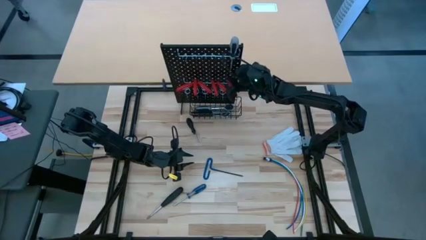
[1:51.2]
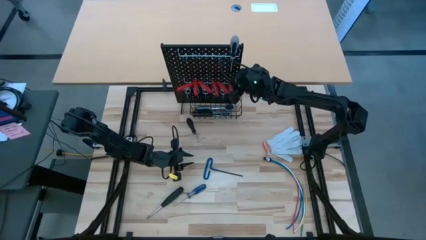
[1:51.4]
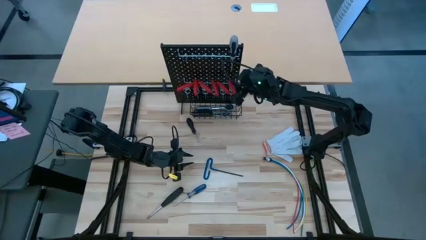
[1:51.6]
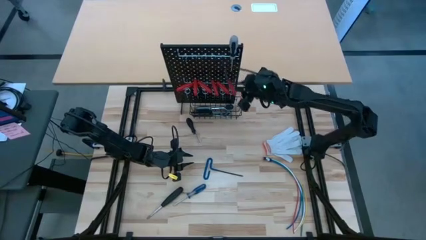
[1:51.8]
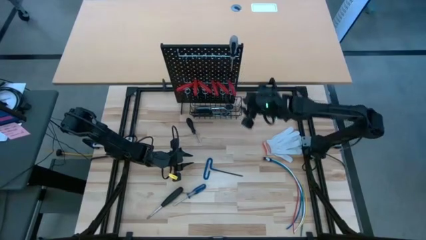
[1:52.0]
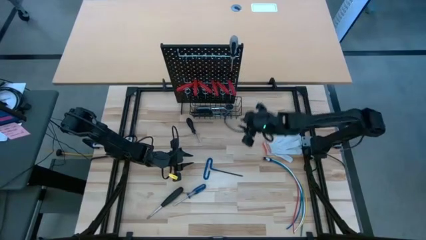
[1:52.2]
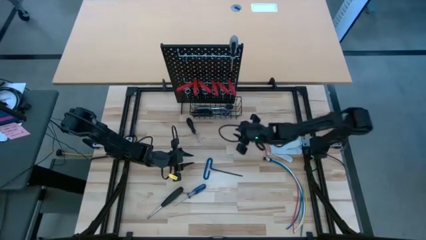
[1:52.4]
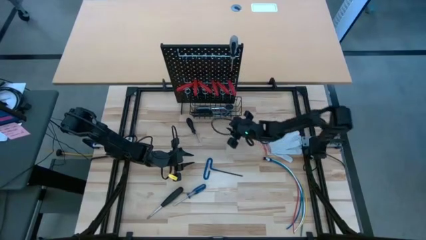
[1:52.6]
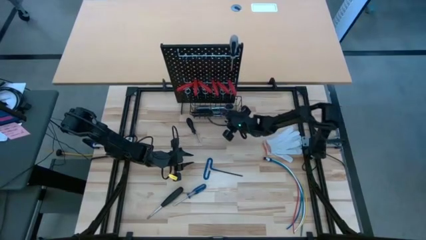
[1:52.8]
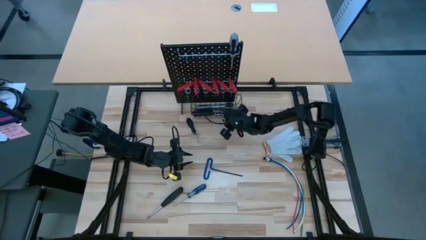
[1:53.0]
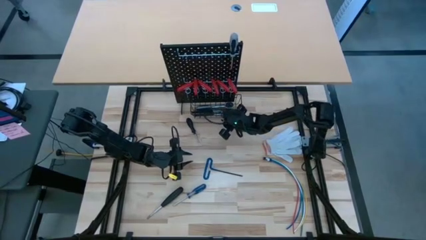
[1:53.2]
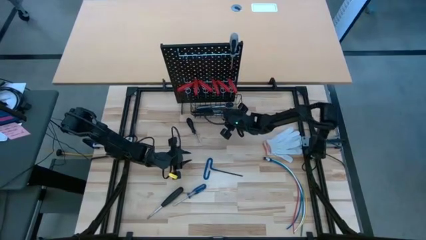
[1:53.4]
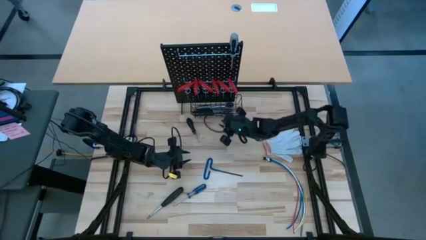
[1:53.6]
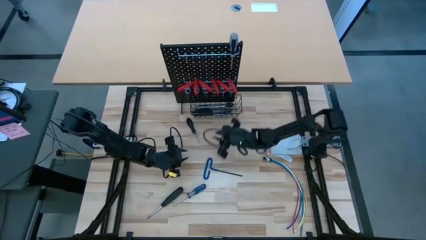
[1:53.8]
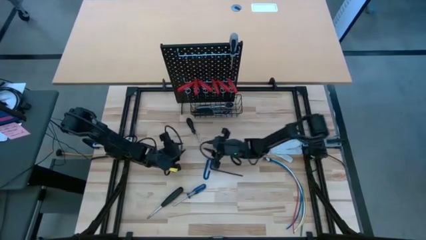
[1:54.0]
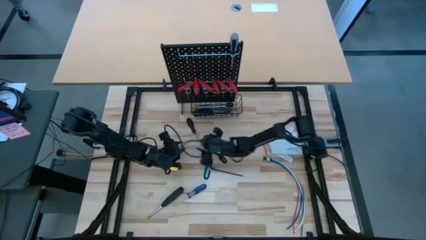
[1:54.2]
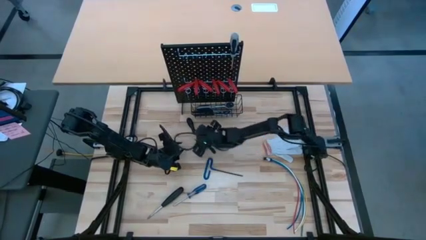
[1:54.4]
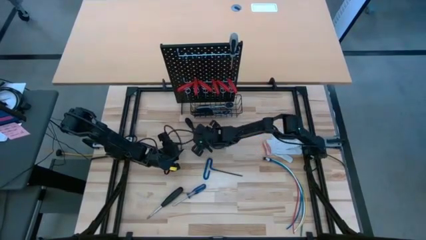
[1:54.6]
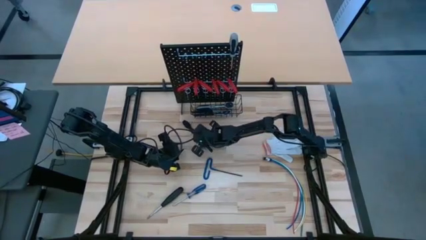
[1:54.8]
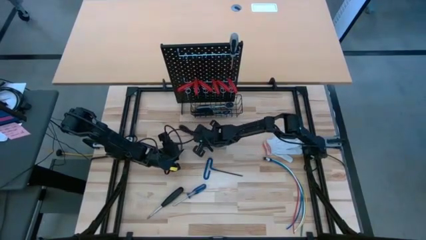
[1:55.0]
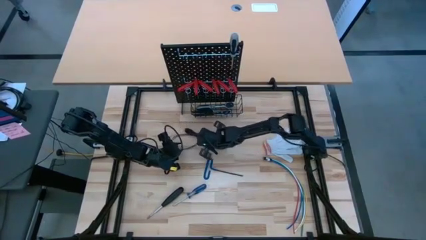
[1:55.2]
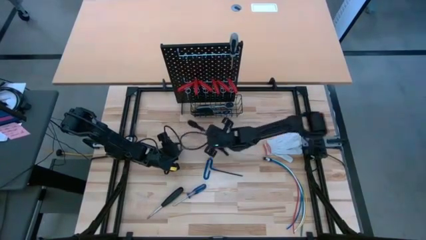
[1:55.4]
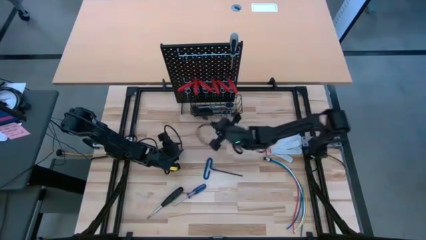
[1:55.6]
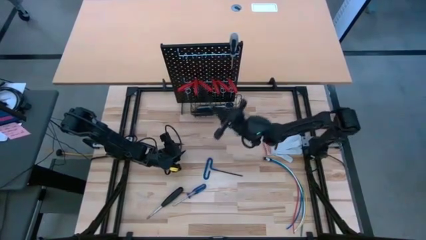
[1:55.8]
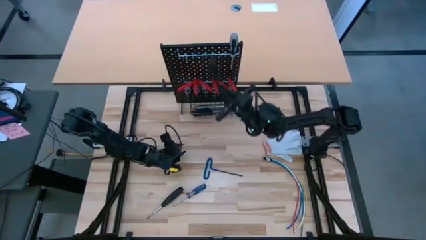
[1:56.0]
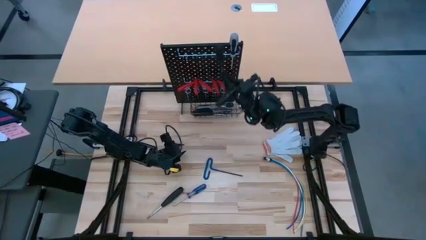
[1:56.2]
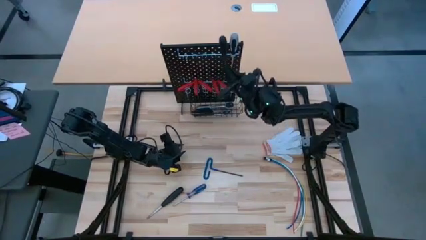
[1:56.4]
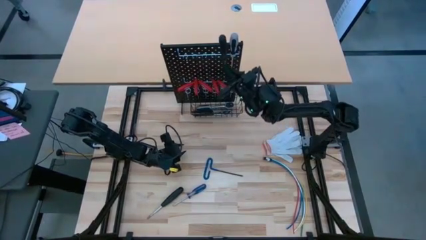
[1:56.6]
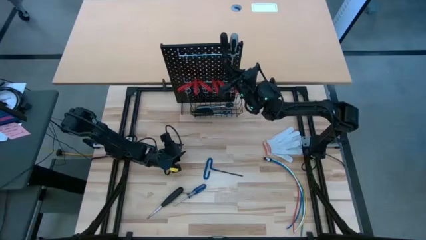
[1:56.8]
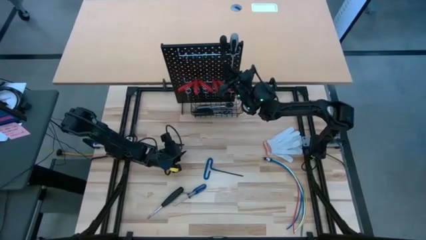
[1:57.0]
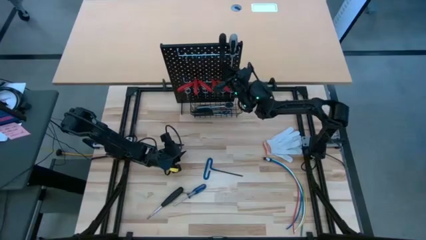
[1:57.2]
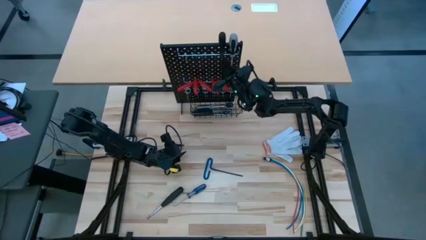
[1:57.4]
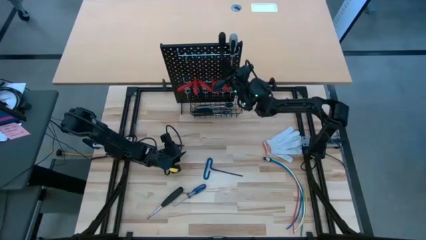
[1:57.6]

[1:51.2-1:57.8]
Task: Hang tools onto peg board
Hang the black screwdriver on the pegboard

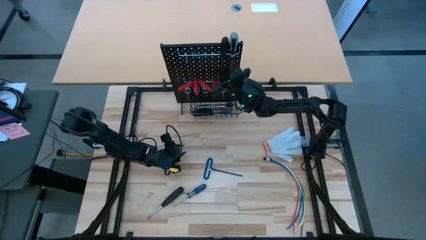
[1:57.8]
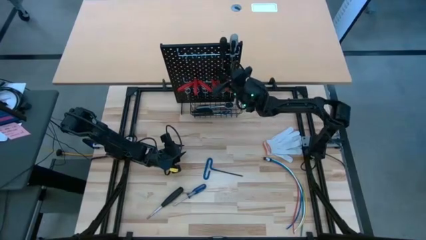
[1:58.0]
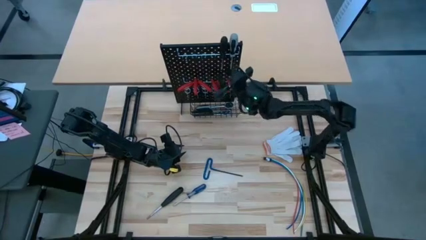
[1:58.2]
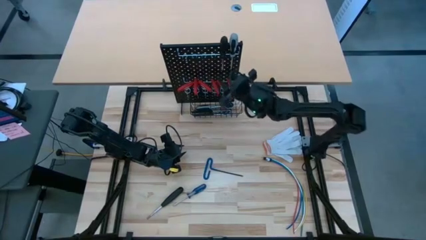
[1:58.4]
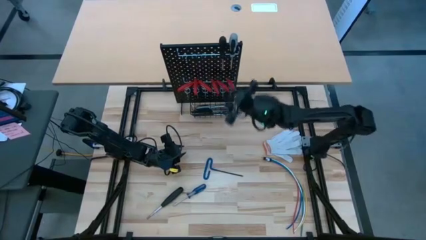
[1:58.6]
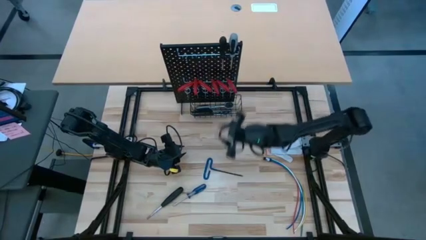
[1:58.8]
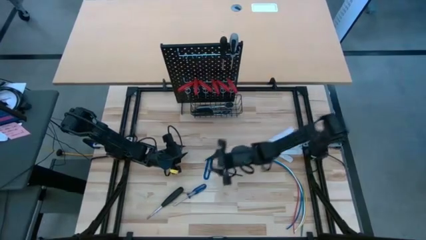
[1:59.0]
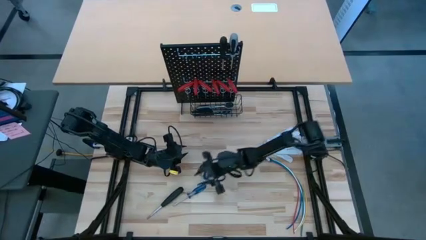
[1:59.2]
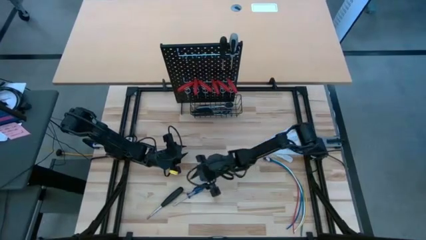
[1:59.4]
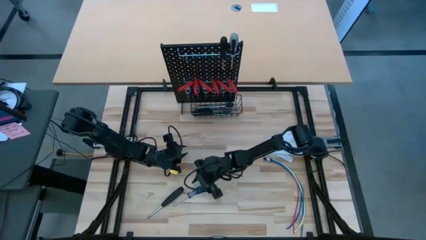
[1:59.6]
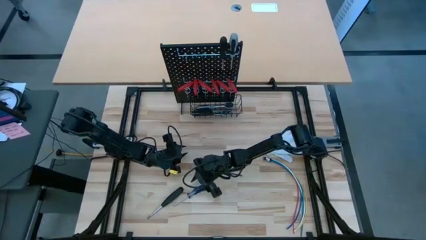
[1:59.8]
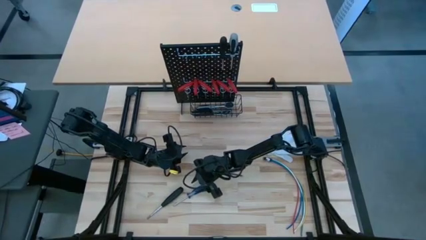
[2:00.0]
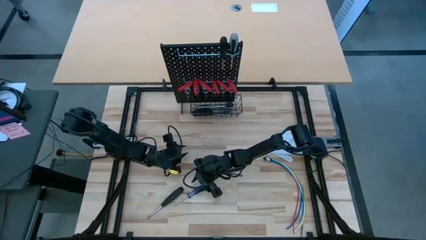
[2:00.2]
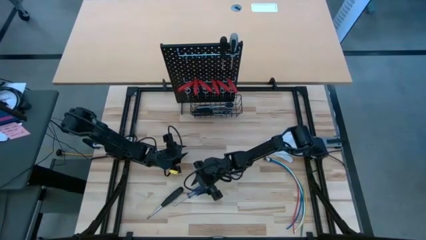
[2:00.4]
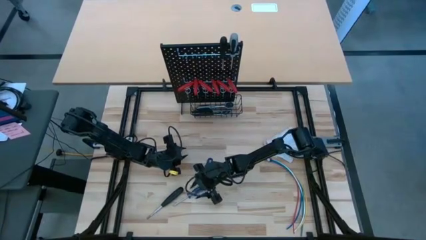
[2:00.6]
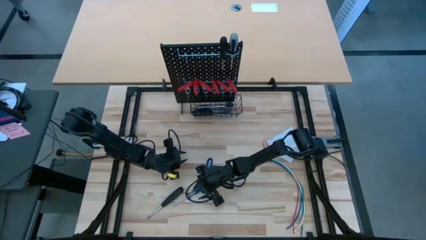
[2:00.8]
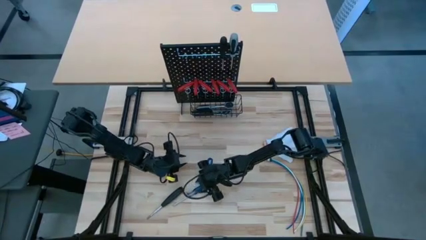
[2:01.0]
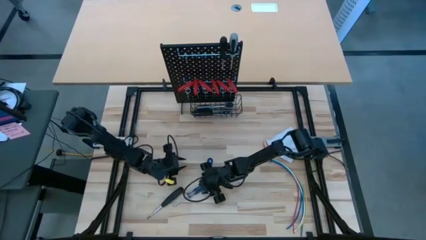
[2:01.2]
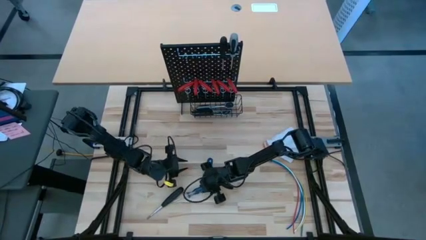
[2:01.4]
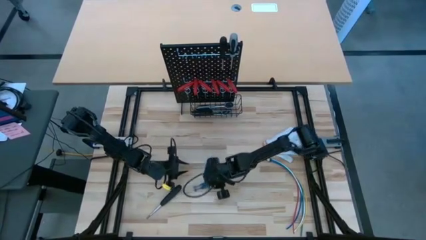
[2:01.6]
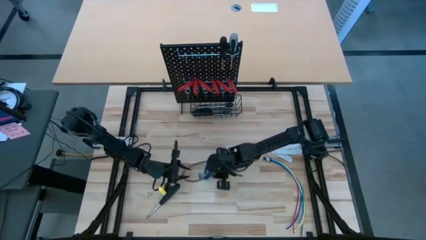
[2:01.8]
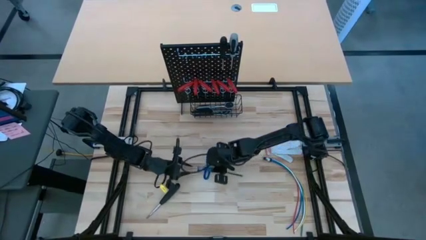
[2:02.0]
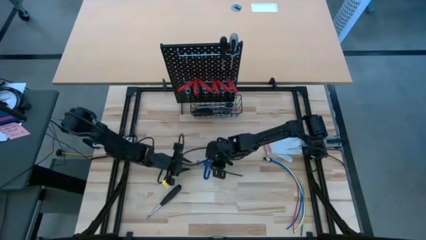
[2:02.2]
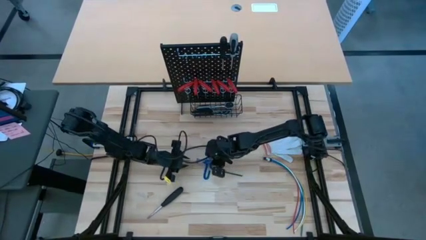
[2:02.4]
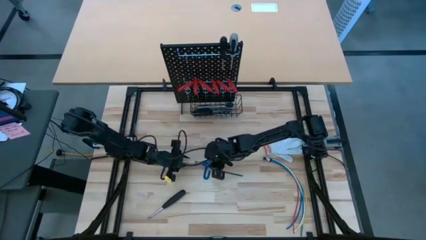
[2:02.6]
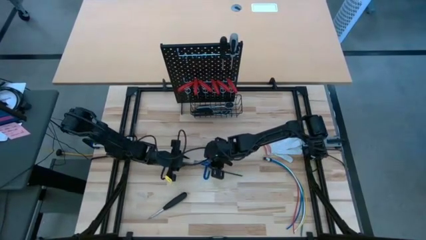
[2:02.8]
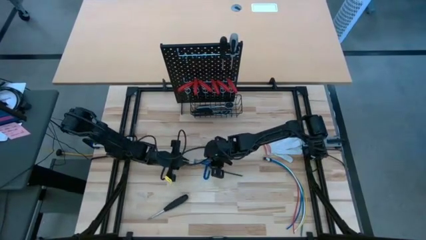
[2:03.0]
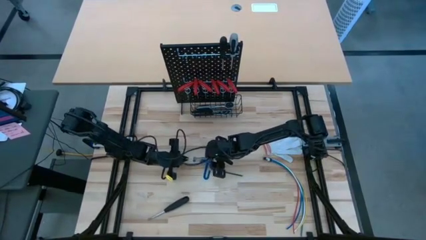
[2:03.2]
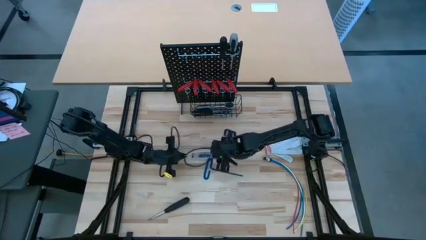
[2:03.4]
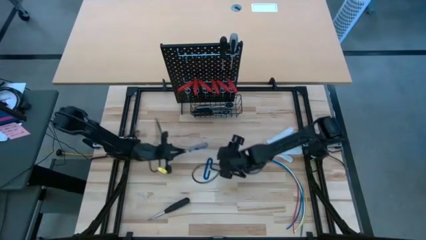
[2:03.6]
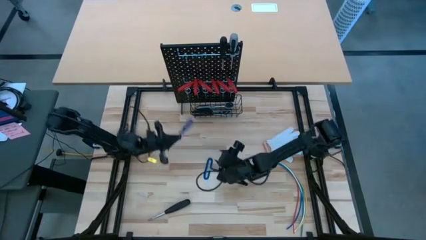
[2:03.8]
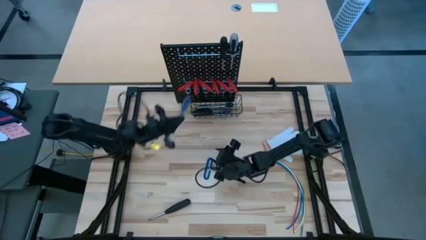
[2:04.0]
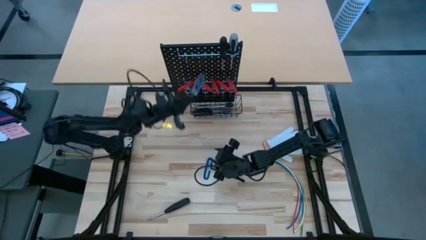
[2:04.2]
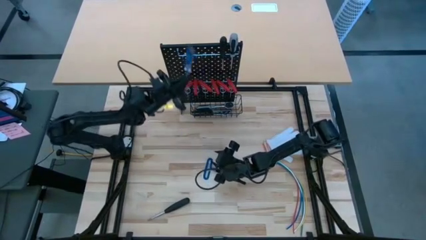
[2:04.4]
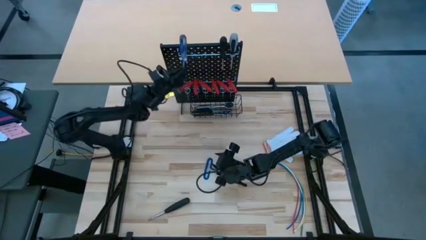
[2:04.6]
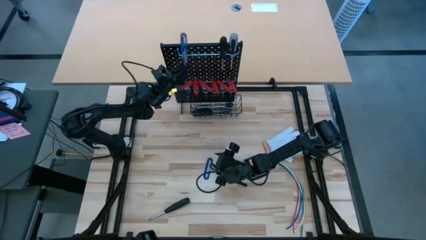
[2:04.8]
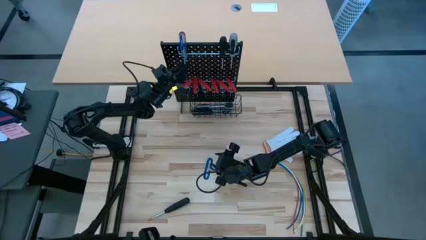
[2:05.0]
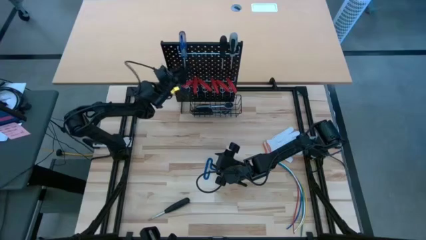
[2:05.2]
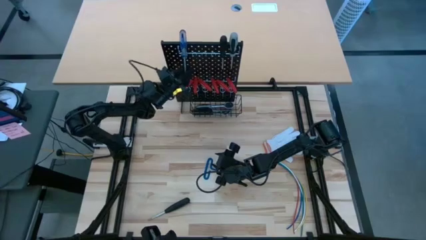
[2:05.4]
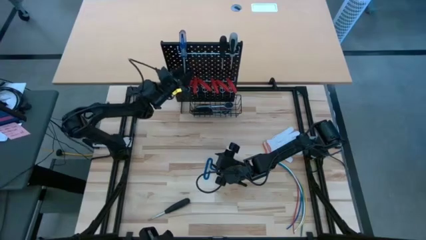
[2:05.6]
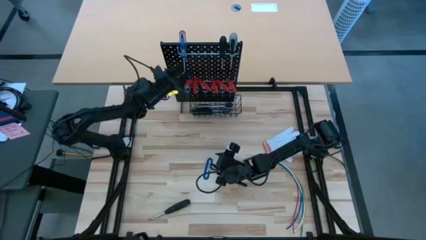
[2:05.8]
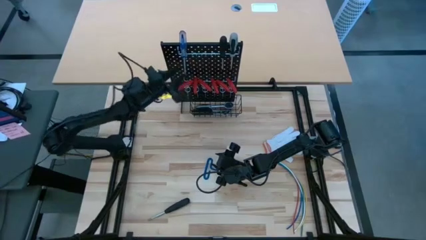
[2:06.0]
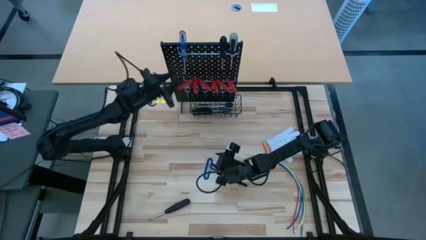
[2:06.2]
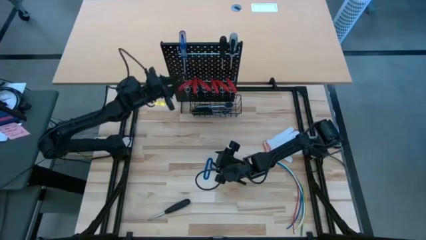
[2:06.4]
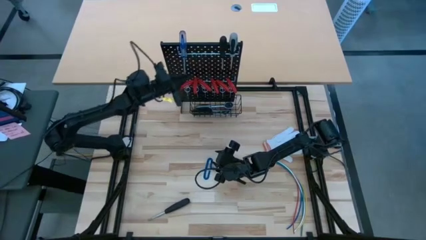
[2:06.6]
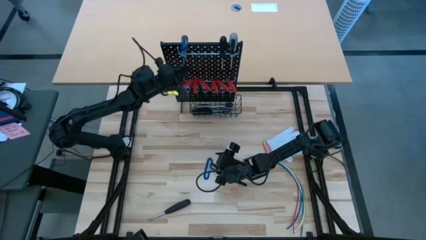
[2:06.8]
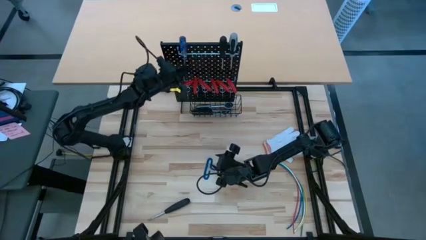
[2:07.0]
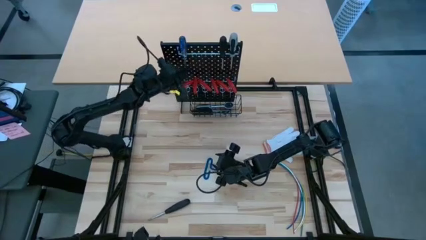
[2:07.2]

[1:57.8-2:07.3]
Hang the transparent screwdriver on the pegboard
